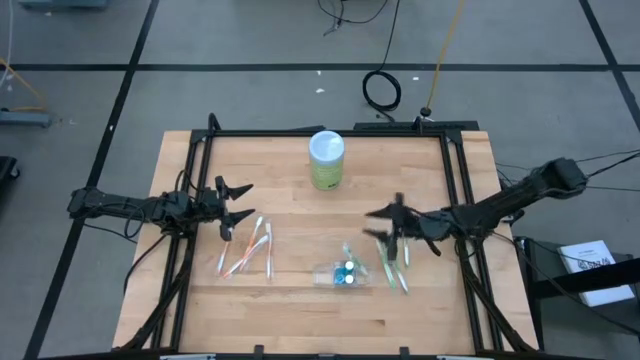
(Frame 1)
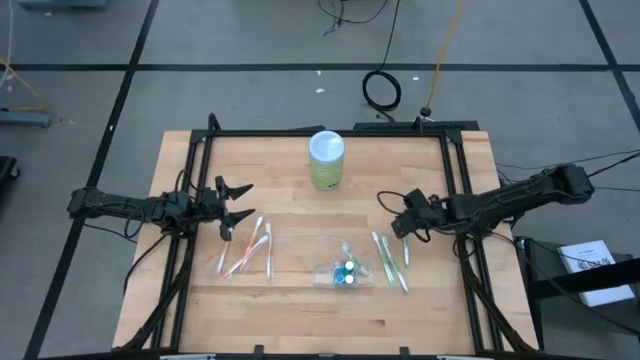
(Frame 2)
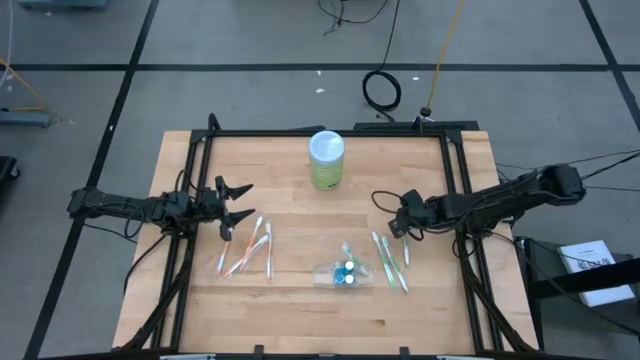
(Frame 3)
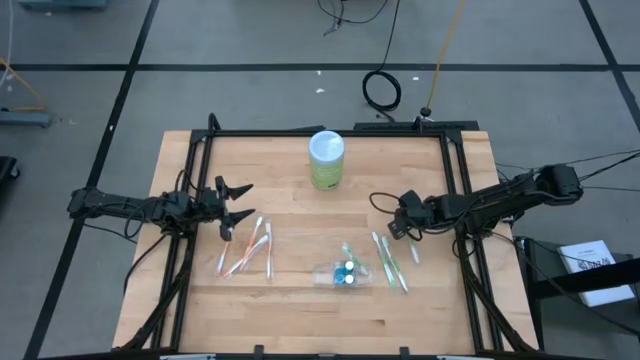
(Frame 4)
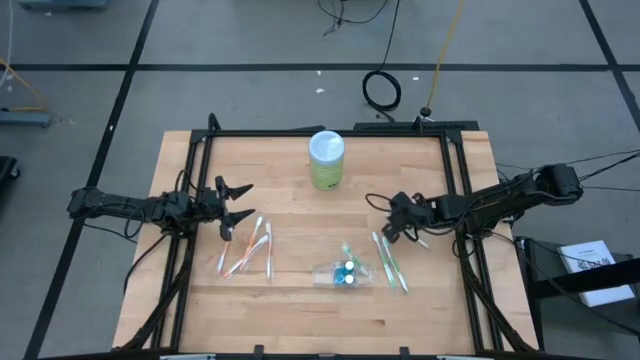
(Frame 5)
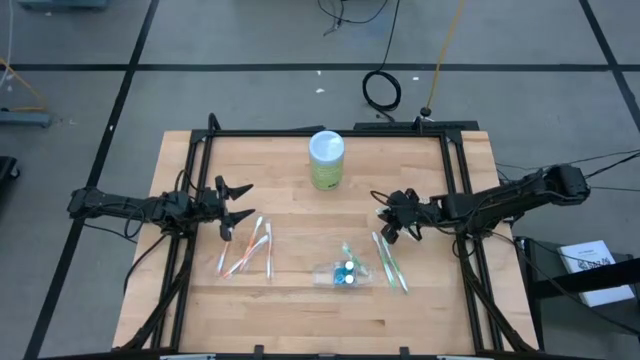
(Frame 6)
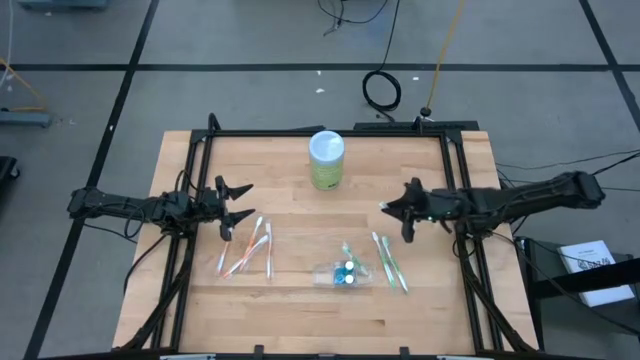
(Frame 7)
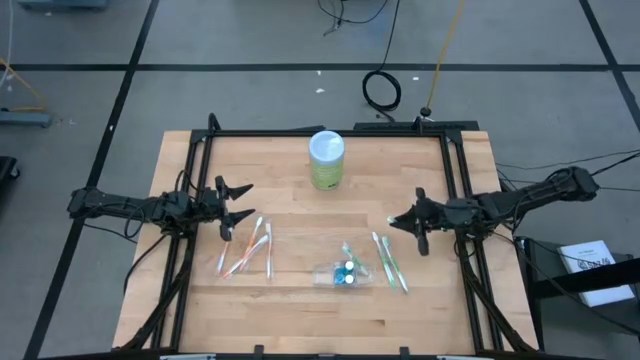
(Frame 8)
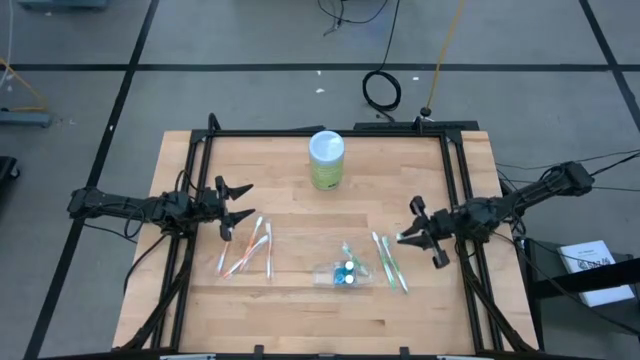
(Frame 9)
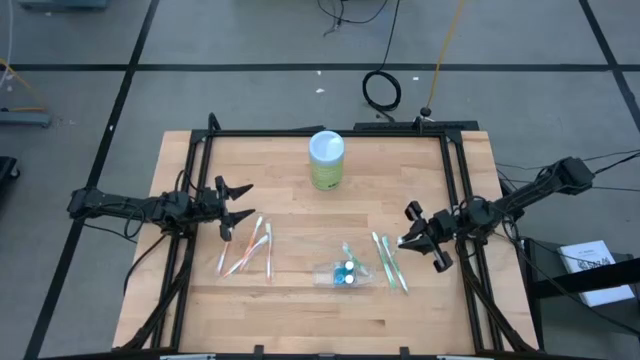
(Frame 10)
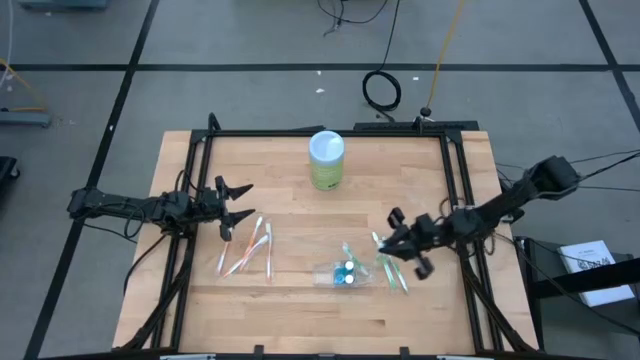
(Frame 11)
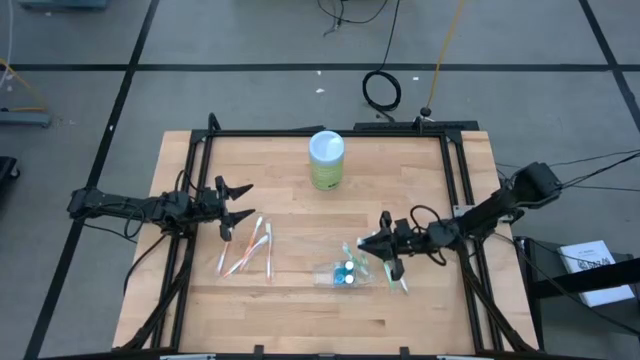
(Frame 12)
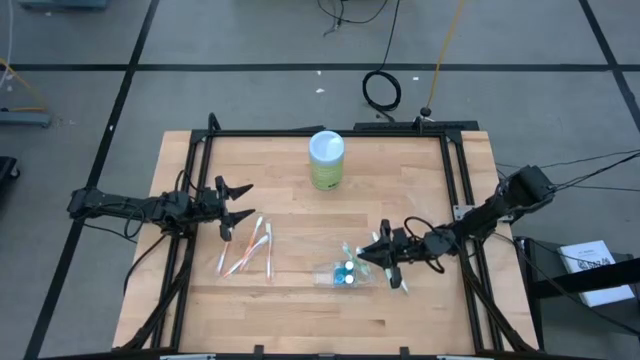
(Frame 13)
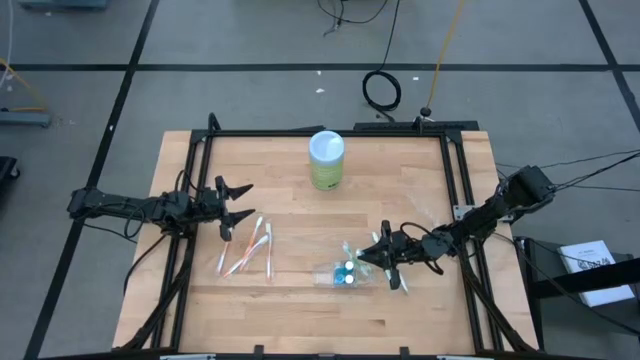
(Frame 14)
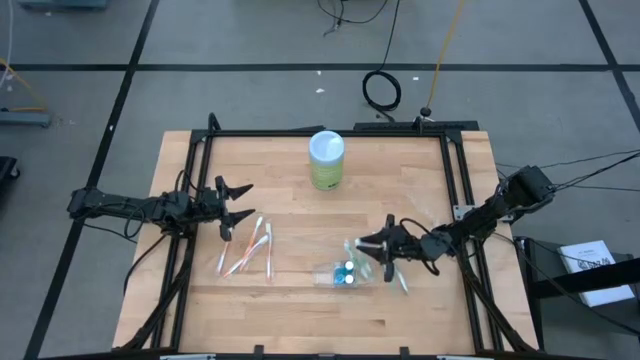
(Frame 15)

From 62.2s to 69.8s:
Task: Pick & Place toothbrushing station
Put the green toothbrush into the right section of the transparent organizer

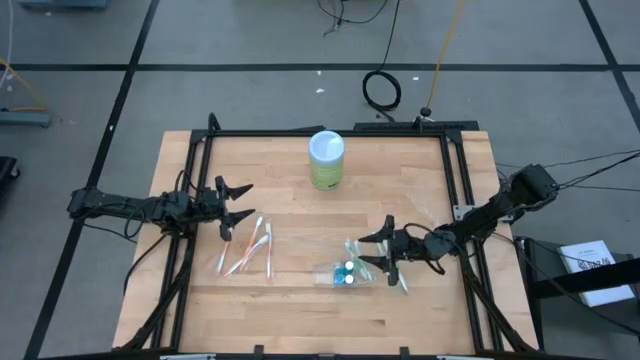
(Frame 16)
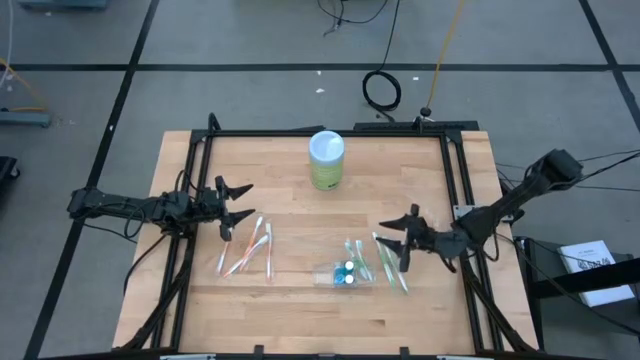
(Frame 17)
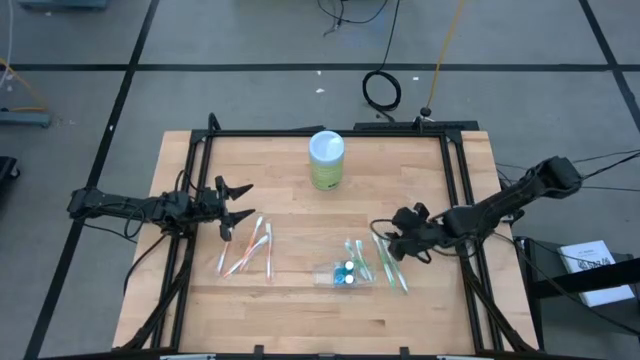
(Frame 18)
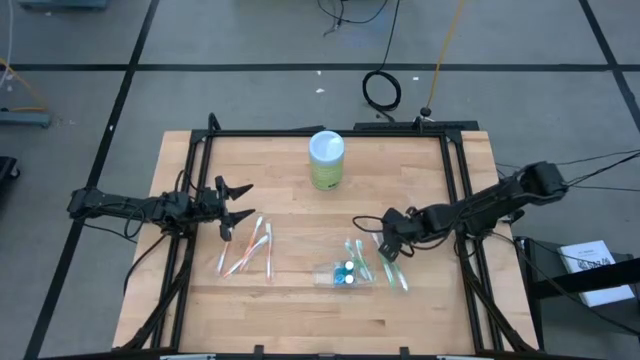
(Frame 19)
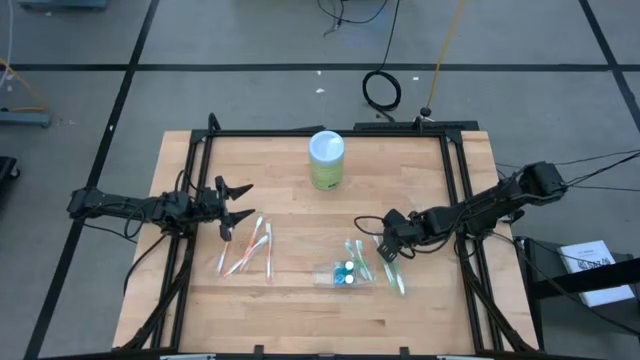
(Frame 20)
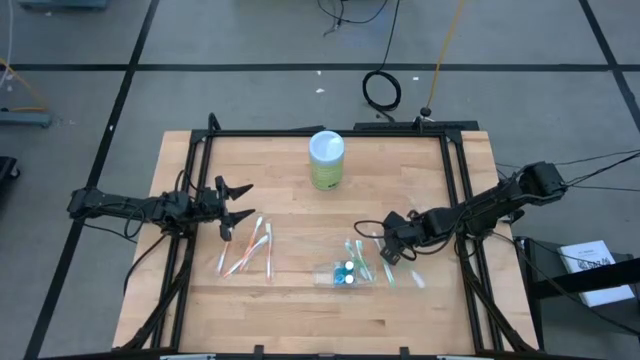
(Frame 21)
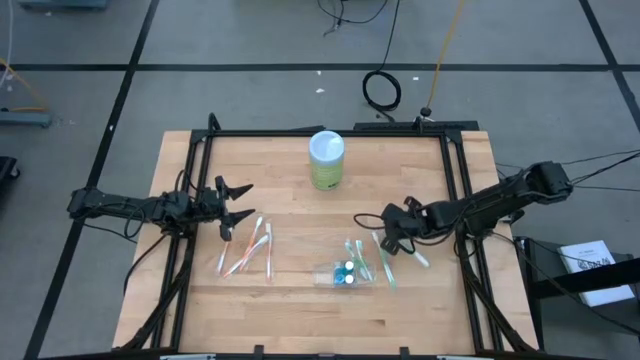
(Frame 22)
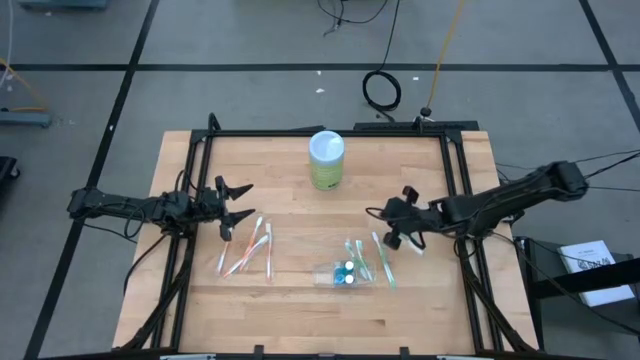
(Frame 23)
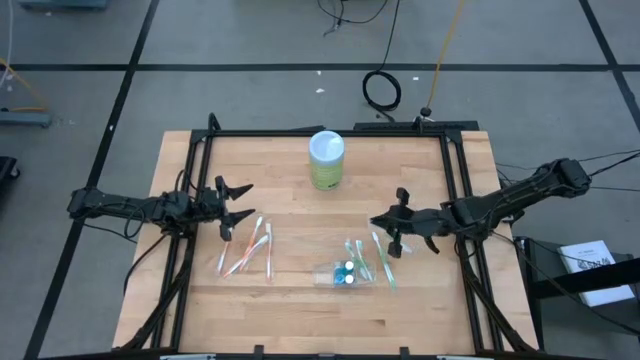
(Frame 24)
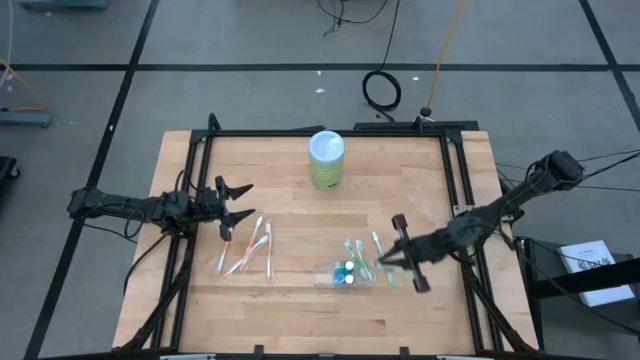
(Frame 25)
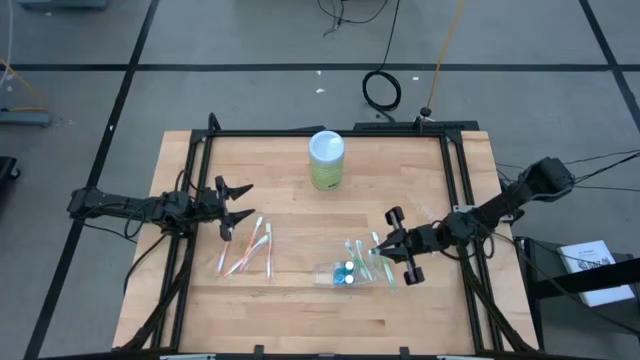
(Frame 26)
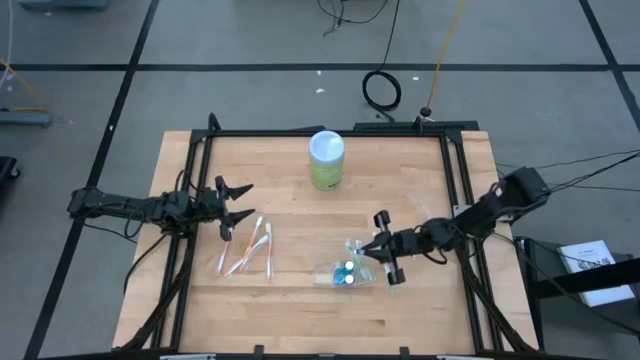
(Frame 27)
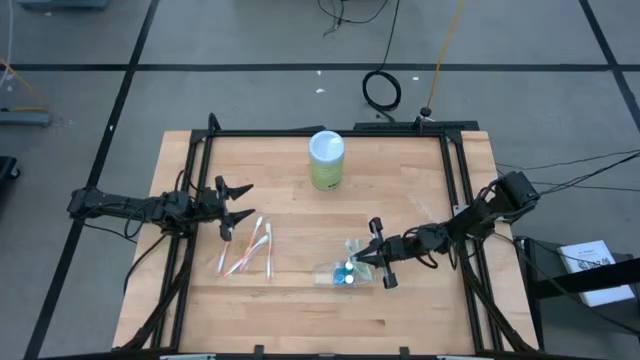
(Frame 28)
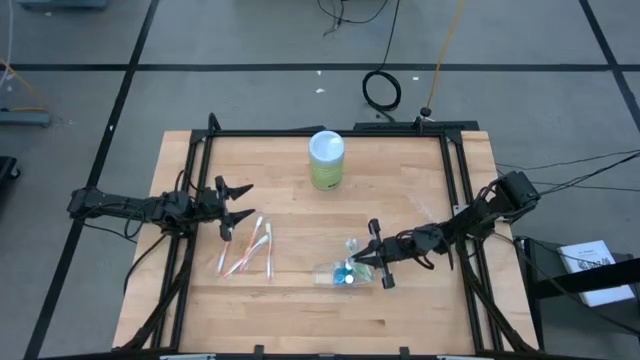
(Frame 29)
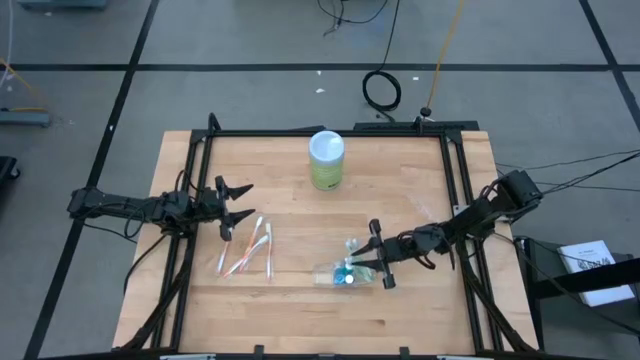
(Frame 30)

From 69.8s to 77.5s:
Put the green toothbrush into the right section of the transparent organizer

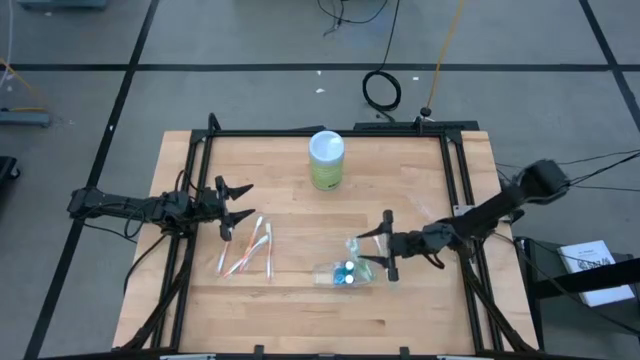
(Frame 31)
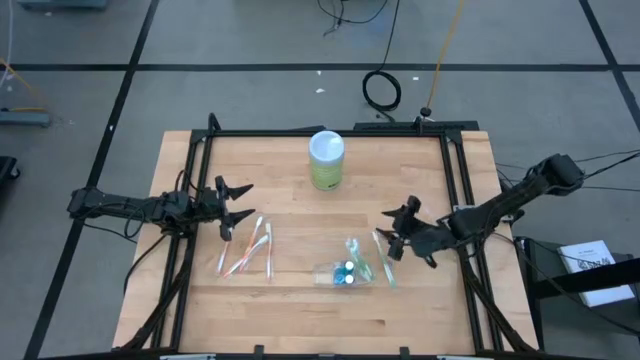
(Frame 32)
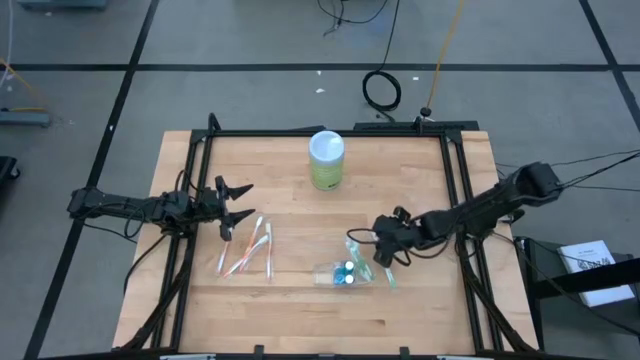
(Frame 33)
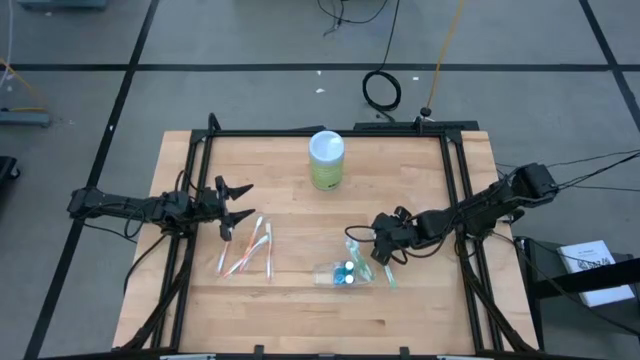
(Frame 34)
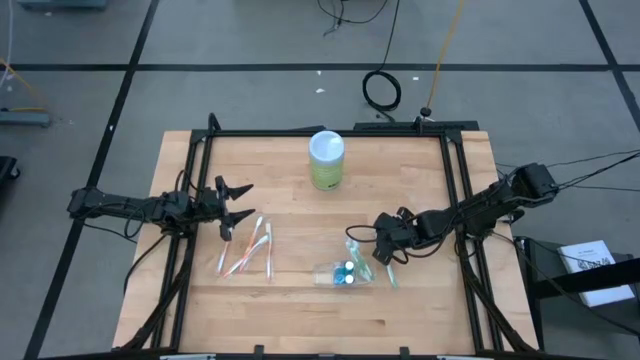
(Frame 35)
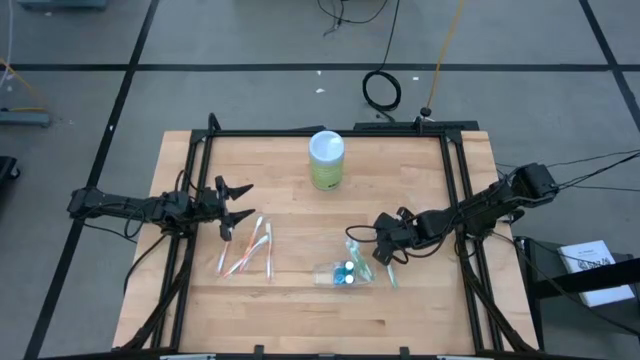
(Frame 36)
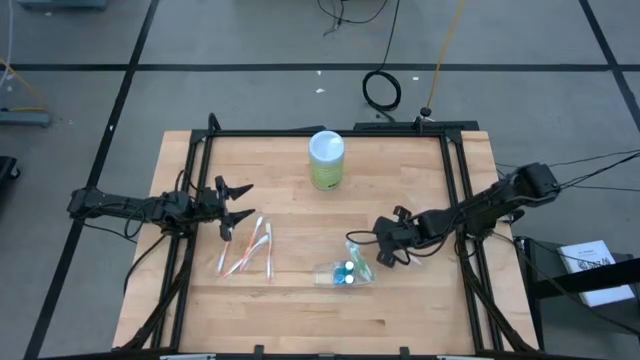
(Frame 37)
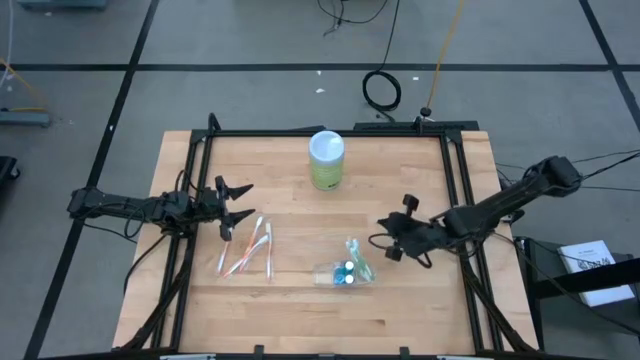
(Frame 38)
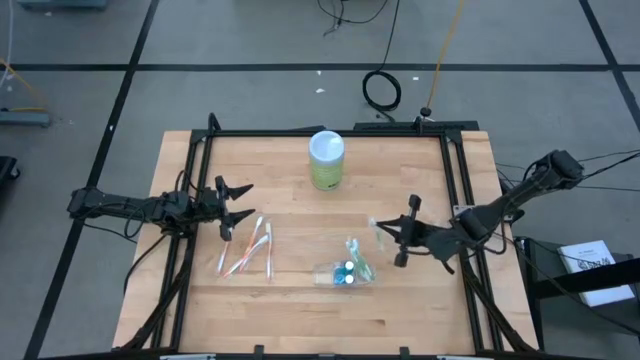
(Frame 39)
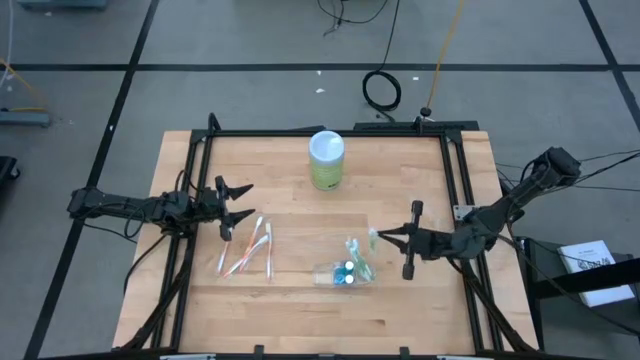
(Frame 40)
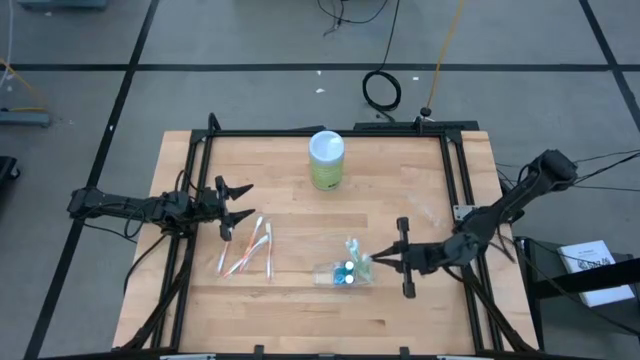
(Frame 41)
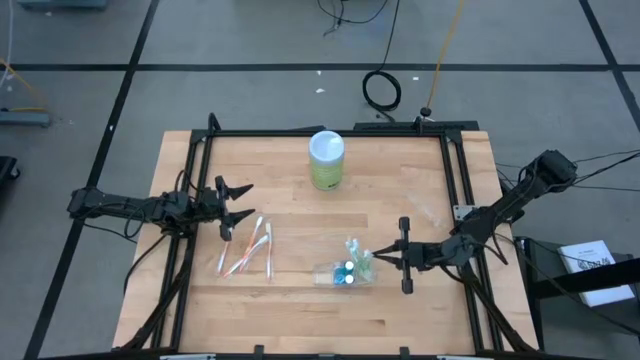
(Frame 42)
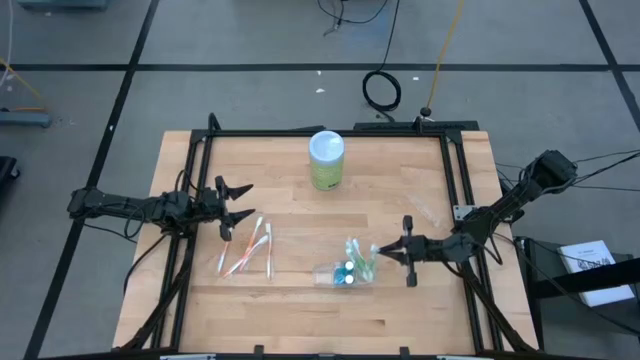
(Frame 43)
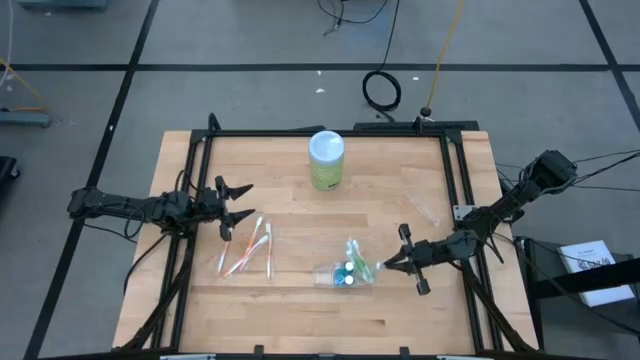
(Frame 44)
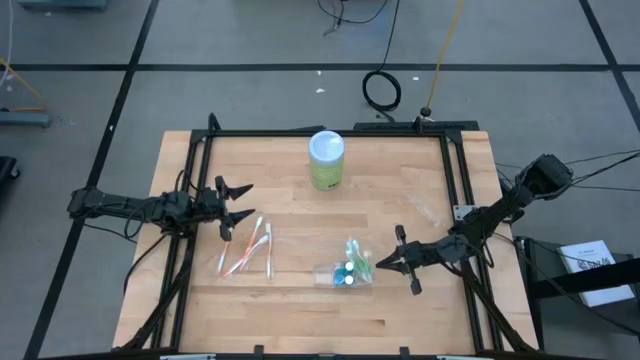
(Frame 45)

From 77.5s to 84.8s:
Put the green toothbrush into the right section of the transparent organizer
